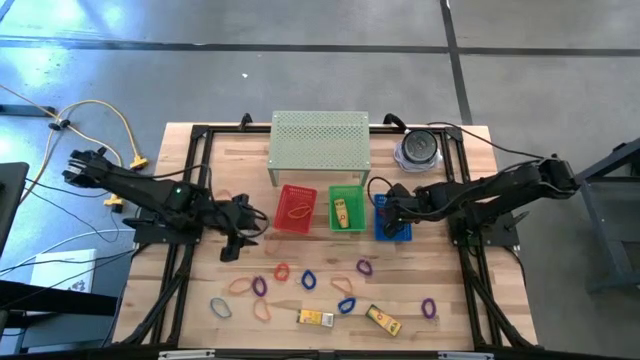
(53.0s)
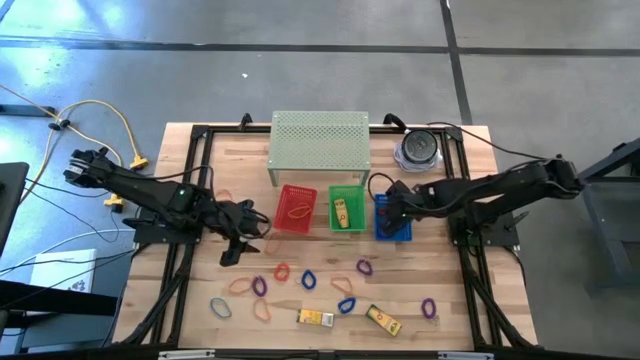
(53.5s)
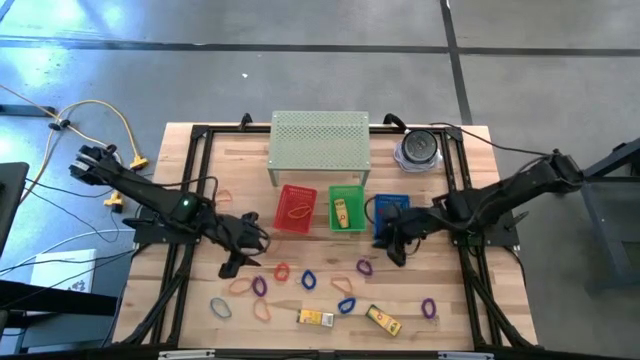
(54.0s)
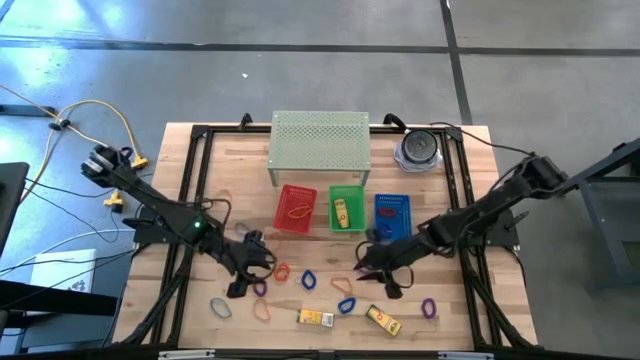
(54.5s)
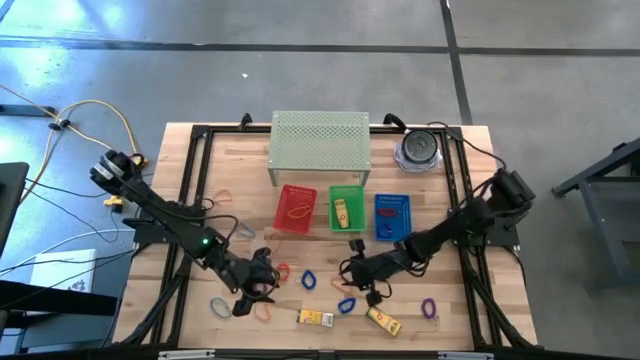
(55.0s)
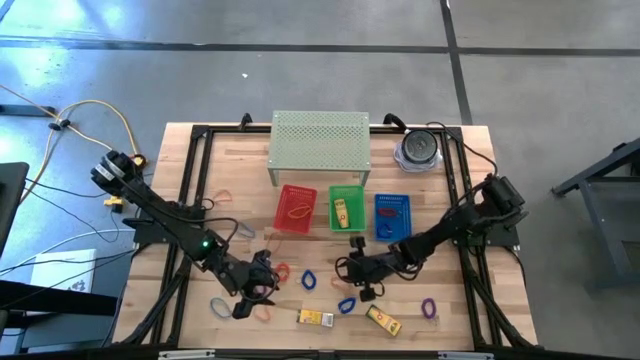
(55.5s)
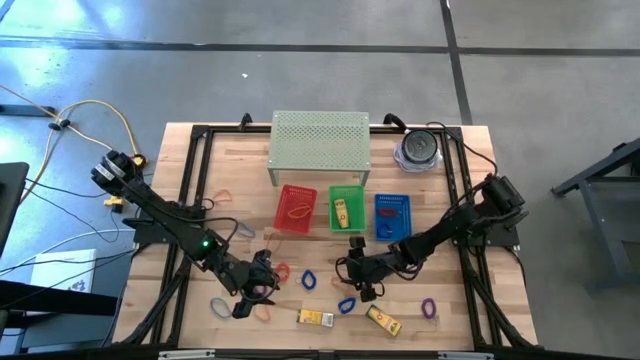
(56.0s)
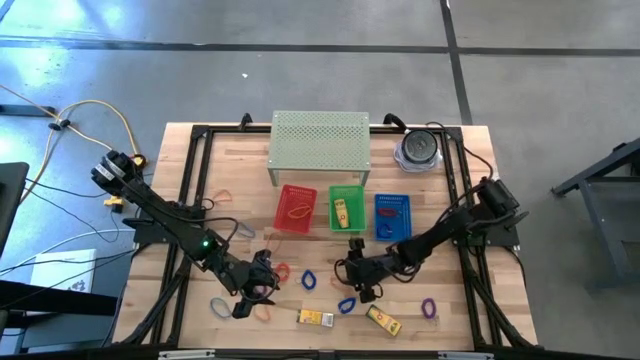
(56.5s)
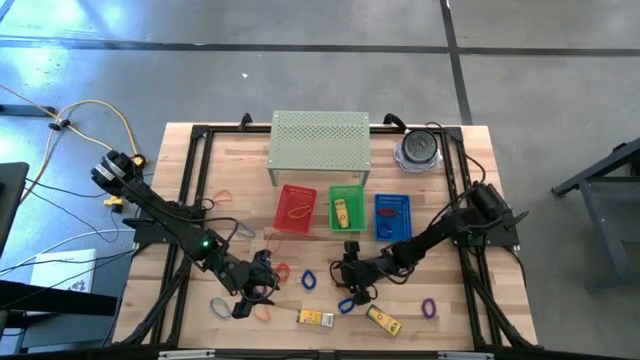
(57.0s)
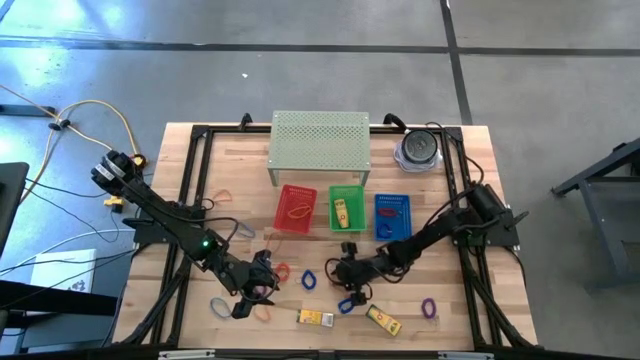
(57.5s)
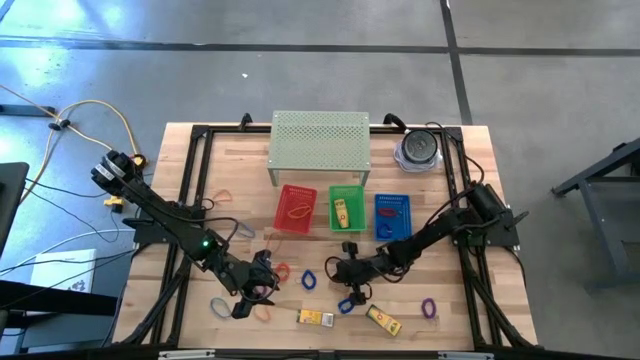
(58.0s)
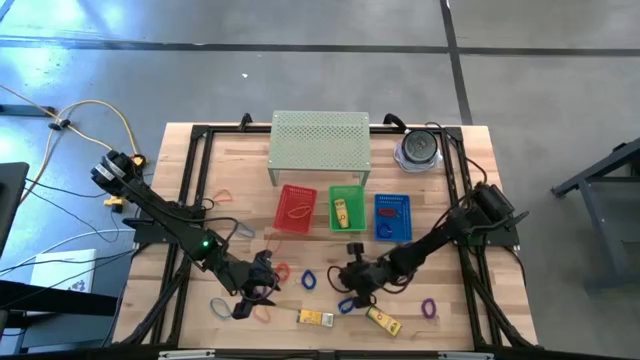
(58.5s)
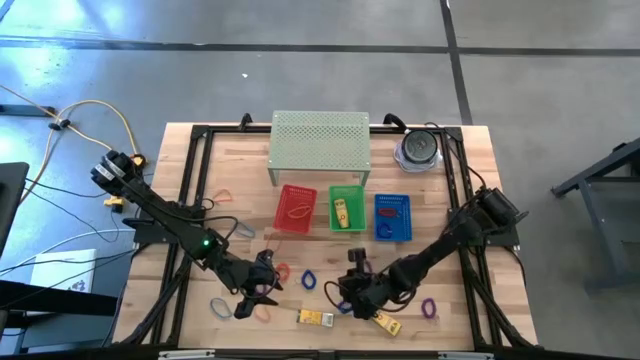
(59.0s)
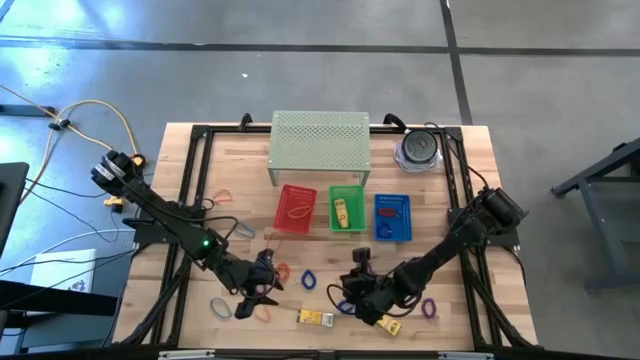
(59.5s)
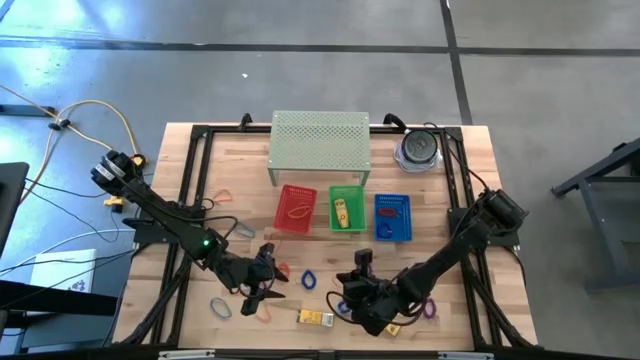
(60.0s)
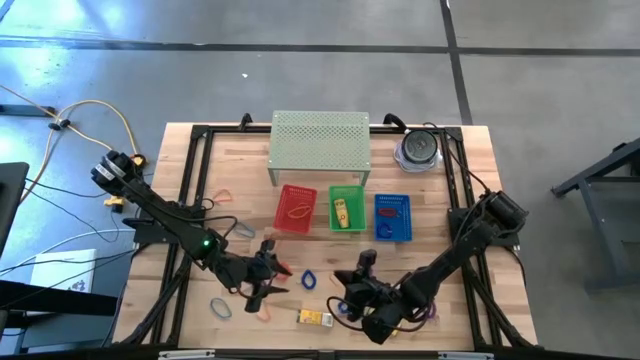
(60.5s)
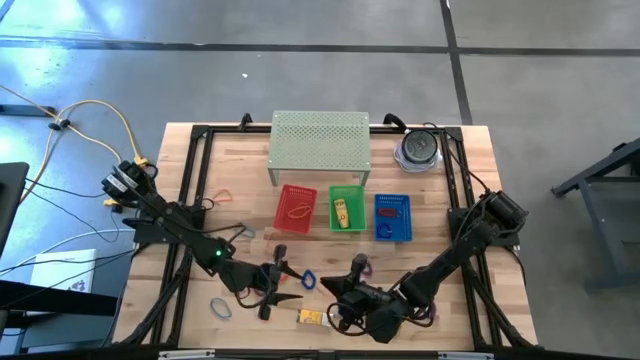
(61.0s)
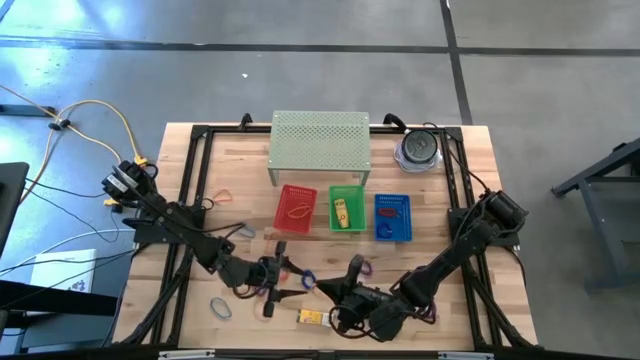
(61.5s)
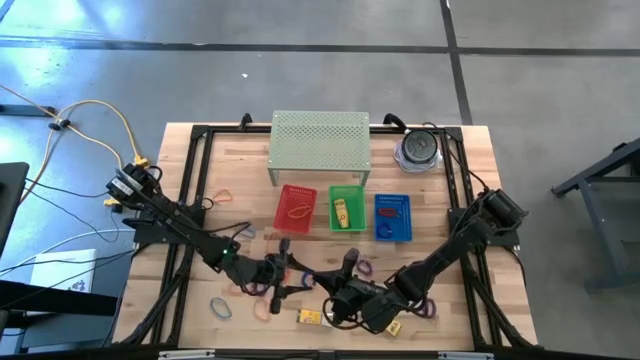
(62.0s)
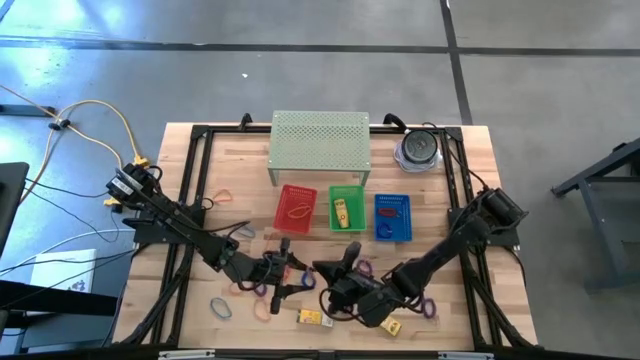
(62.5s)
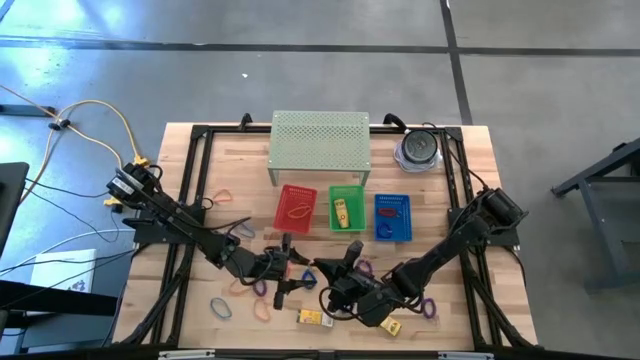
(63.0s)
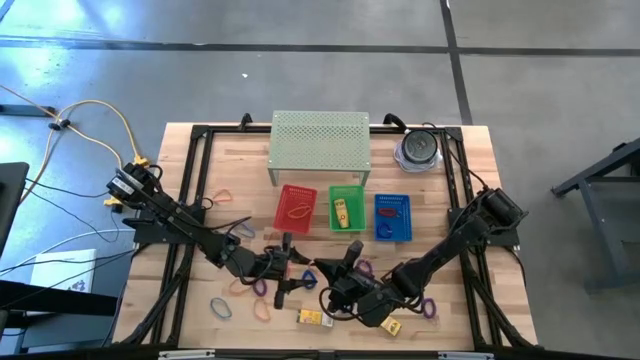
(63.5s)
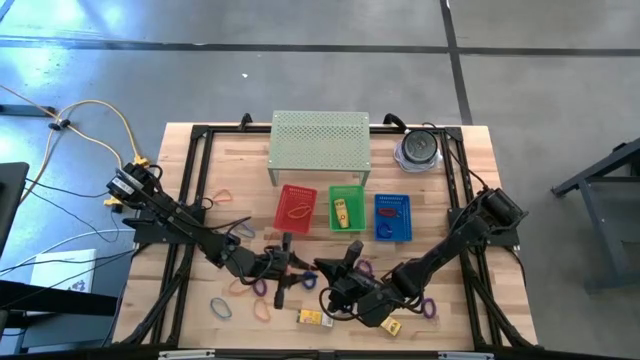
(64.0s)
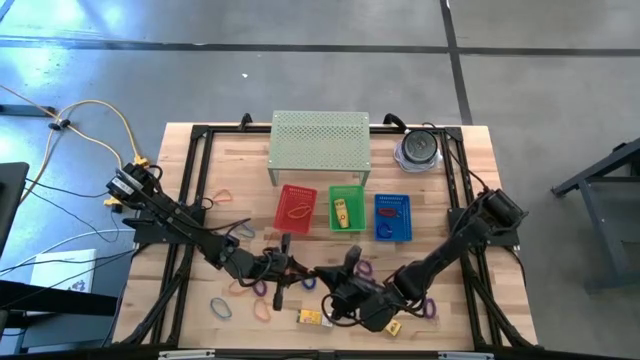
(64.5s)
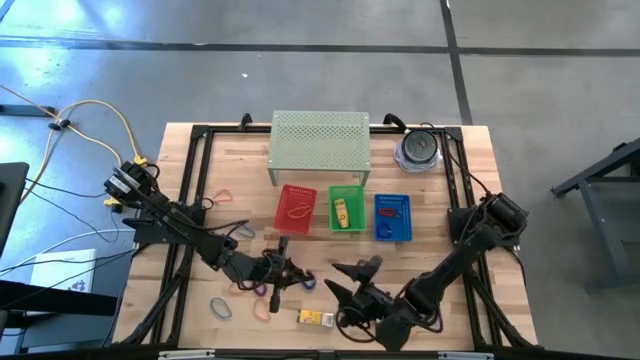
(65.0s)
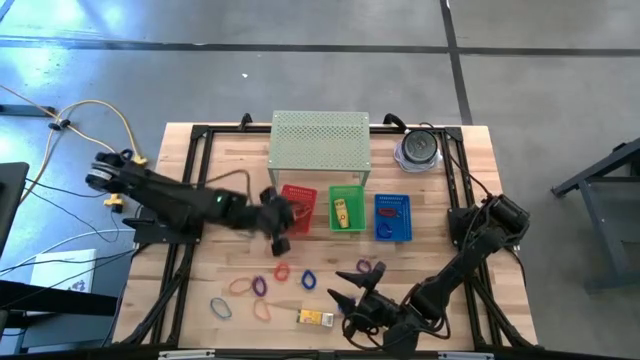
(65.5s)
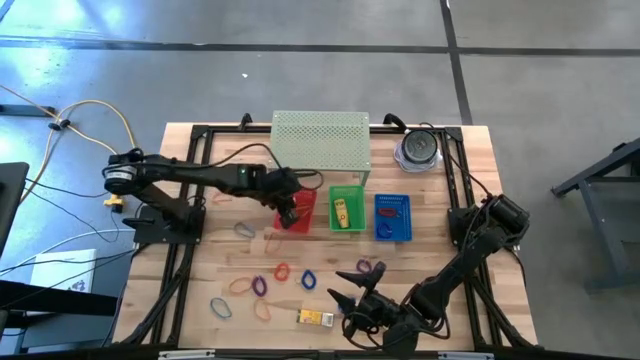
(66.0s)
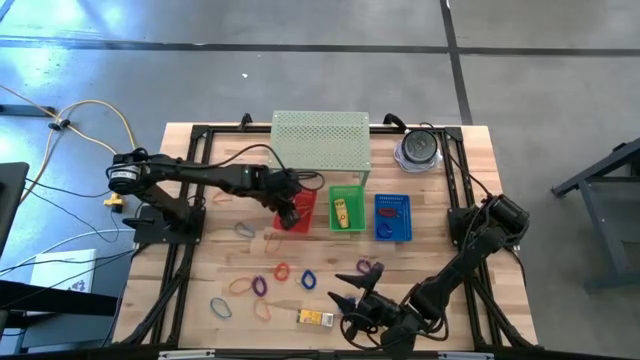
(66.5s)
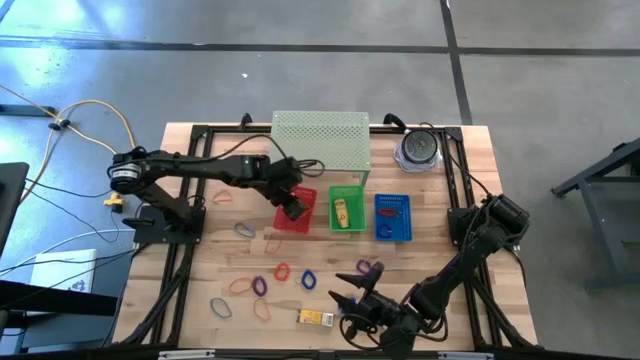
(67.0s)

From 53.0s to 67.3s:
Task: Pick & Place Office Desk Supplies
Put the orange rubber band into the red bin

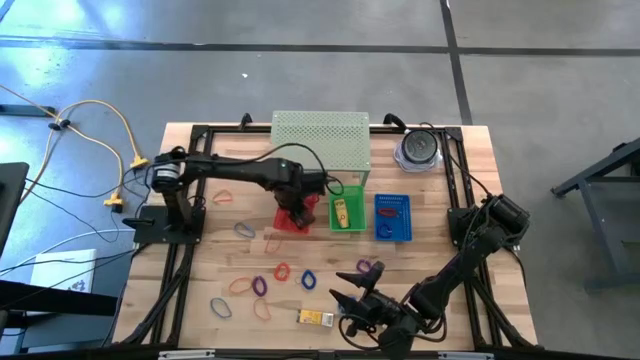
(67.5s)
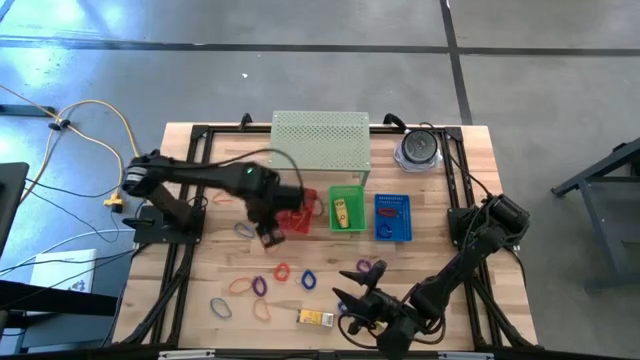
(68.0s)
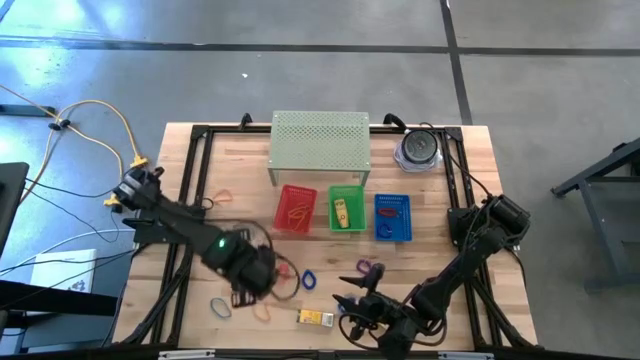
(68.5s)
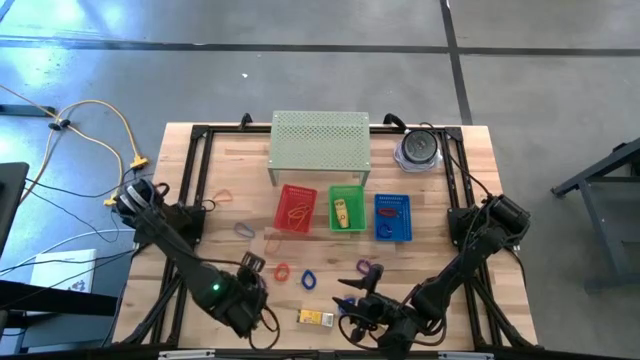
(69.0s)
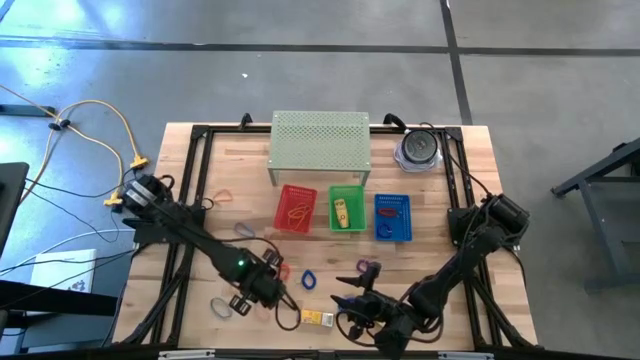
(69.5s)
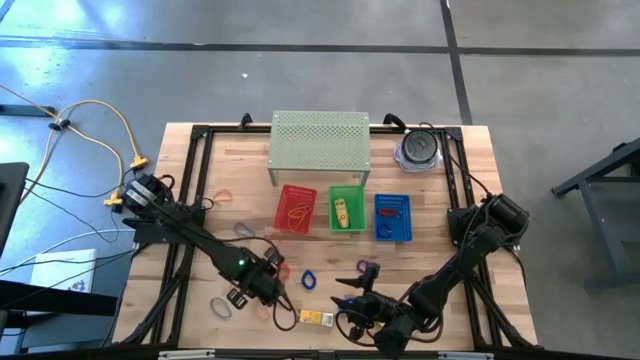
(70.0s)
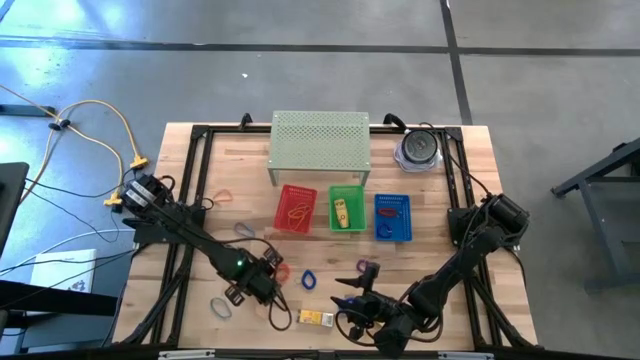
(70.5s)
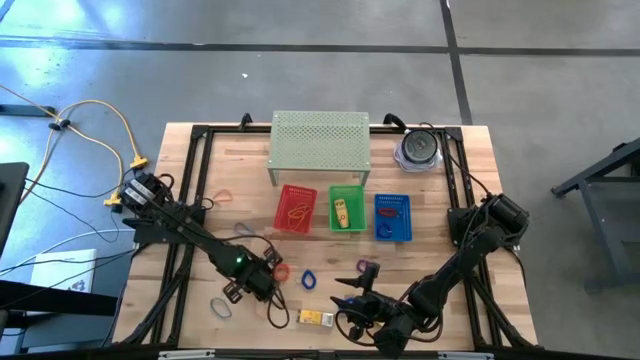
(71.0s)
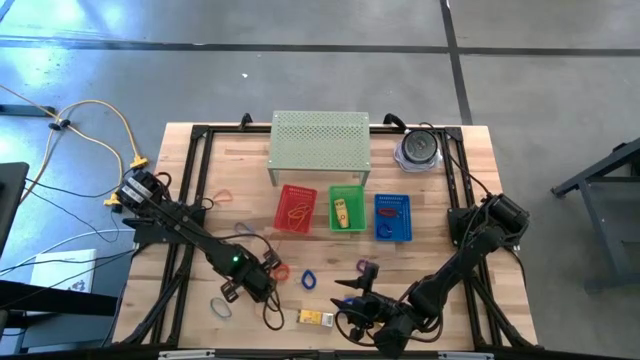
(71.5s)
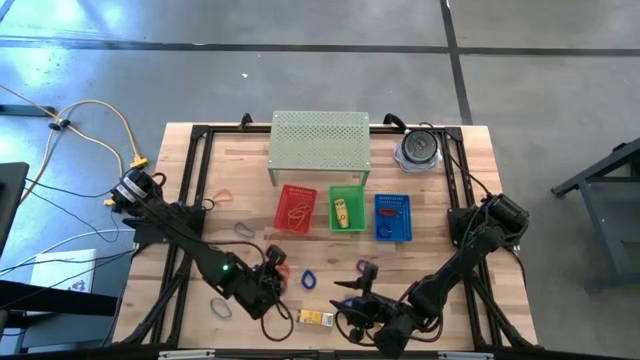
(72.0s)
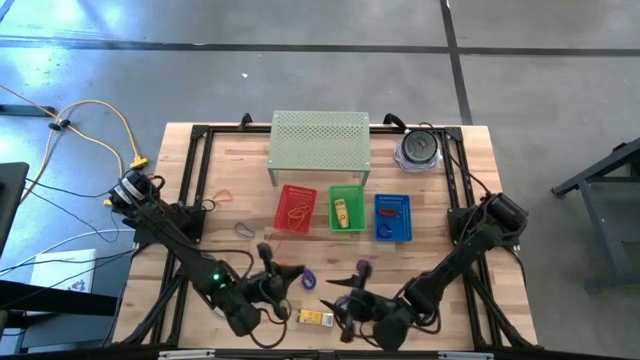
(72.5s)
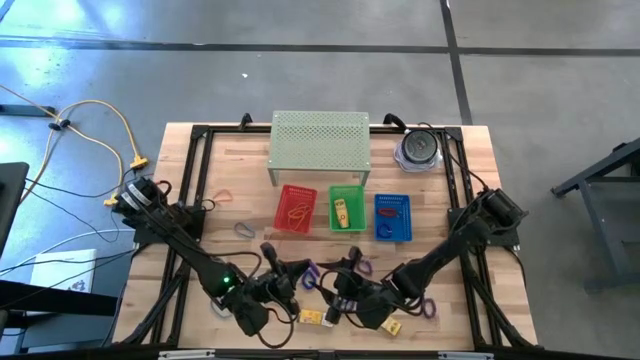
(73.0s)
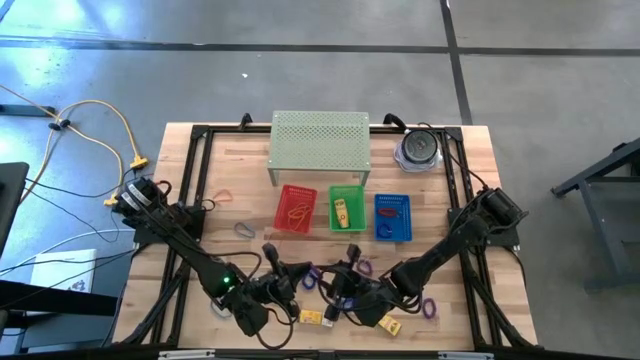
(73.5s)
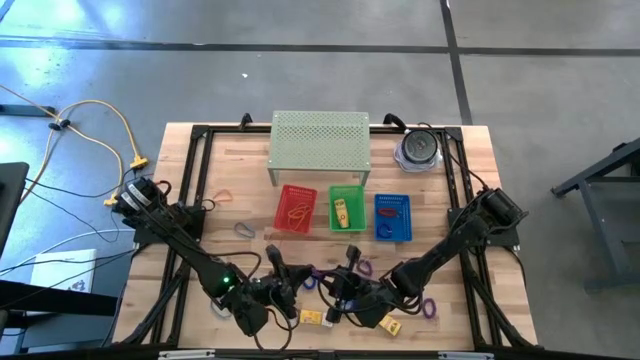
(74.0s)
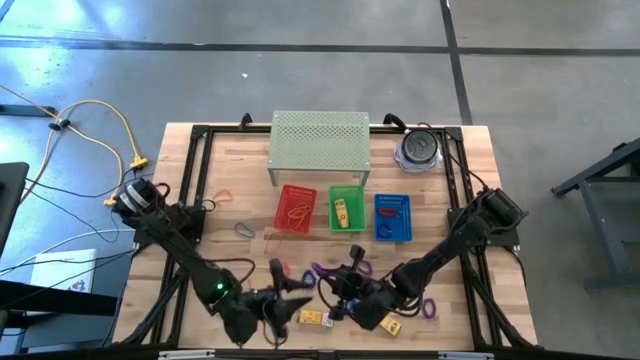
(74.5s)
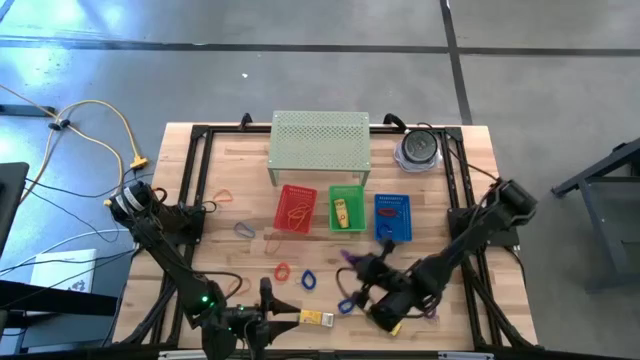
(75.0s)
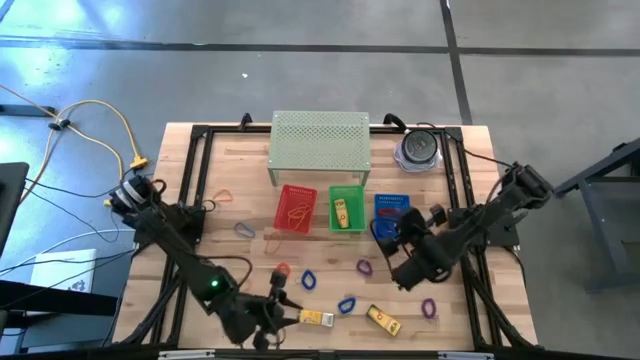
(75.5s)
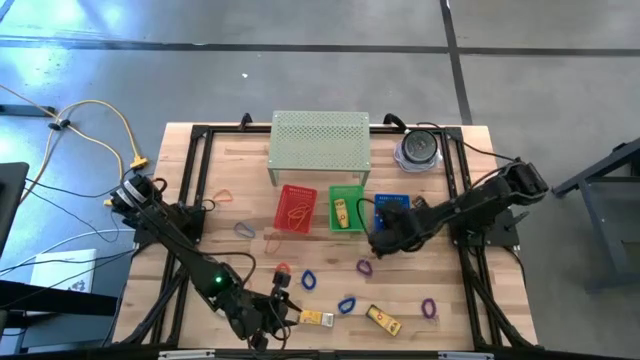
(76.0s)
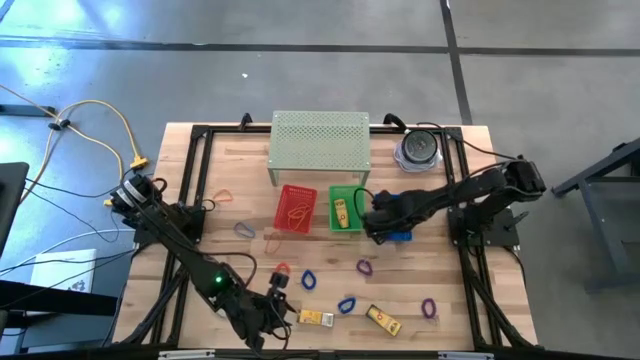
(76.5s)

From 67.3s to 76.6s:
Put the left purple spring keychain into the blue bin
